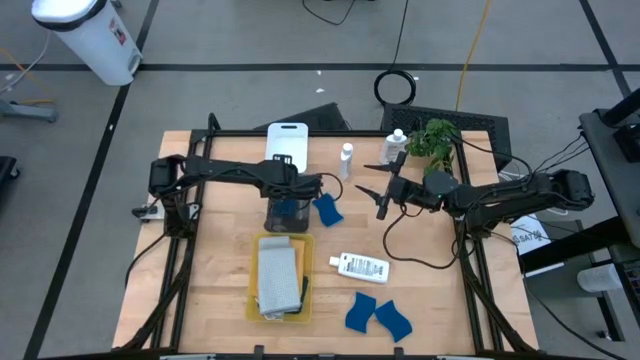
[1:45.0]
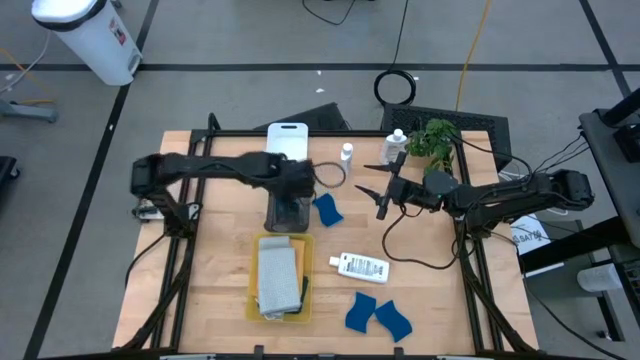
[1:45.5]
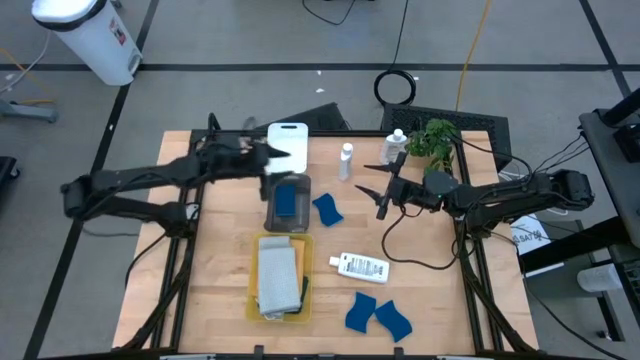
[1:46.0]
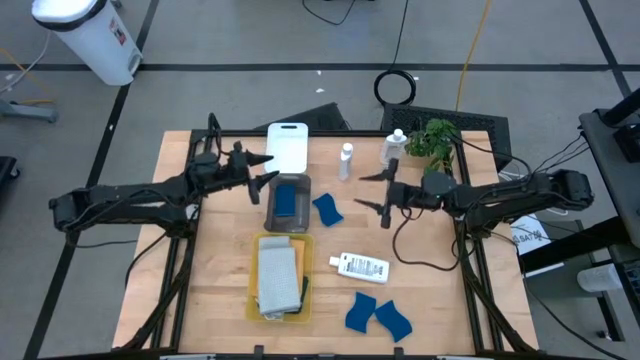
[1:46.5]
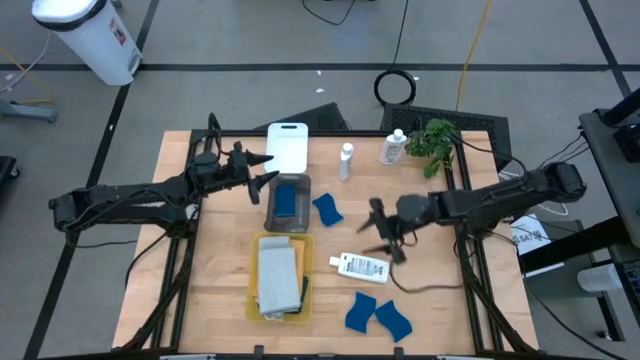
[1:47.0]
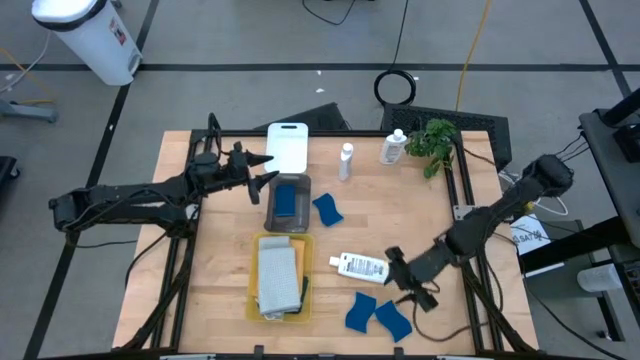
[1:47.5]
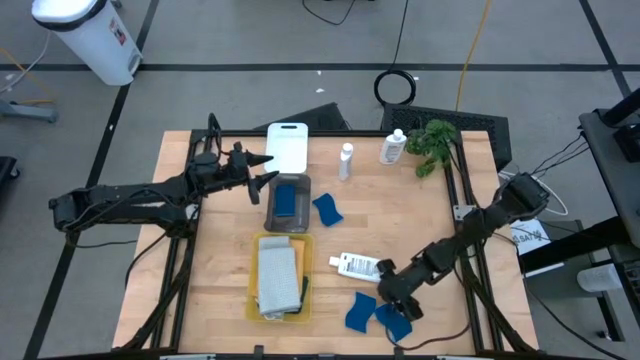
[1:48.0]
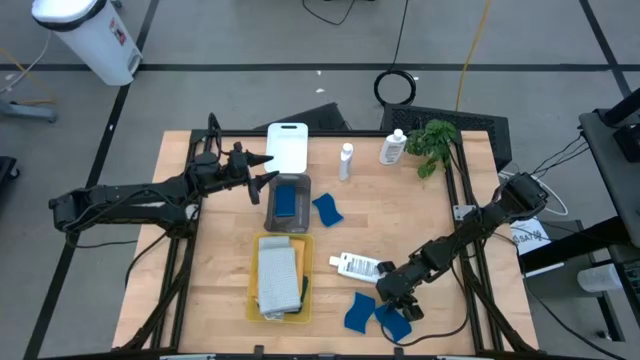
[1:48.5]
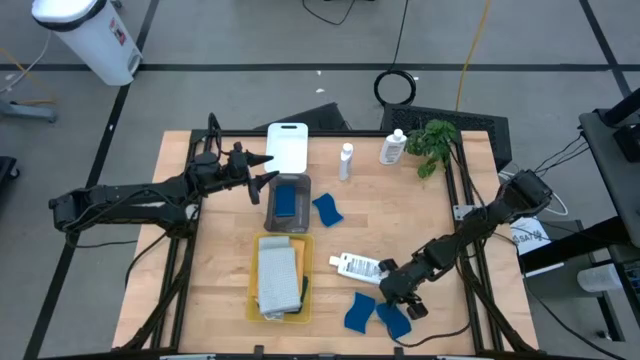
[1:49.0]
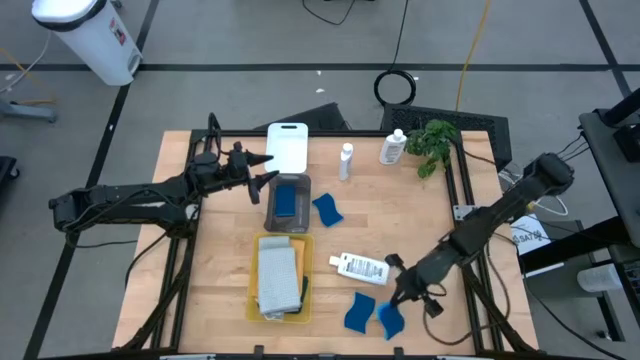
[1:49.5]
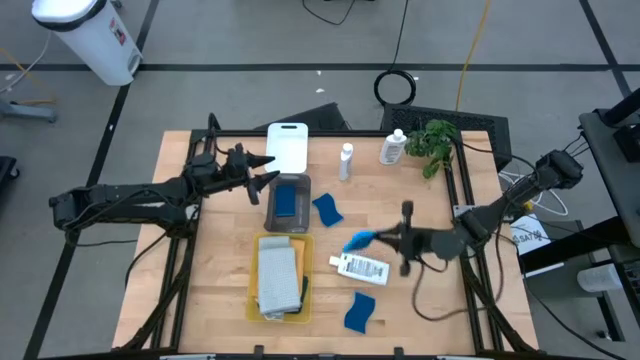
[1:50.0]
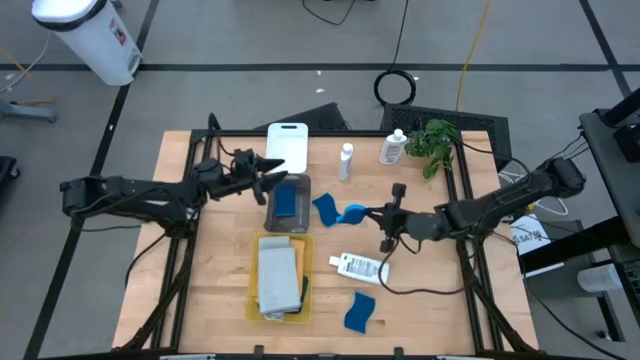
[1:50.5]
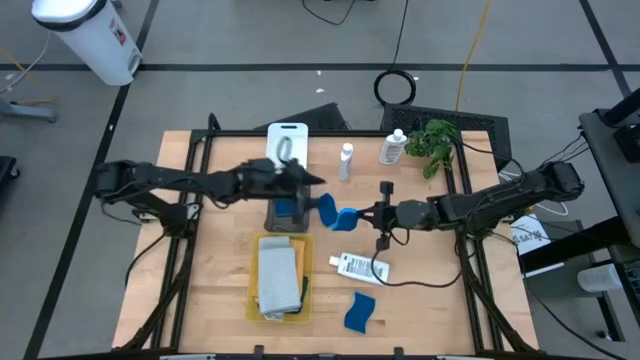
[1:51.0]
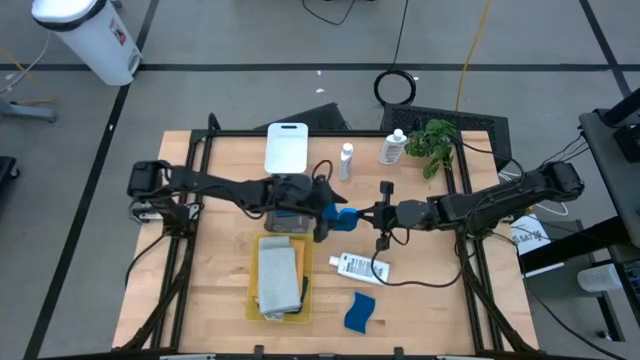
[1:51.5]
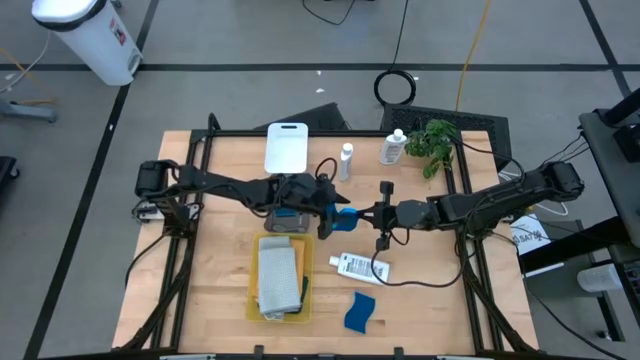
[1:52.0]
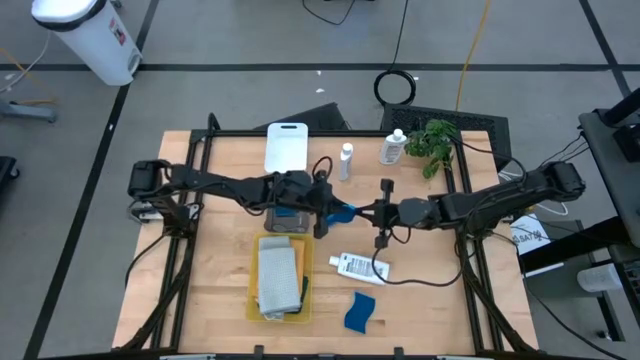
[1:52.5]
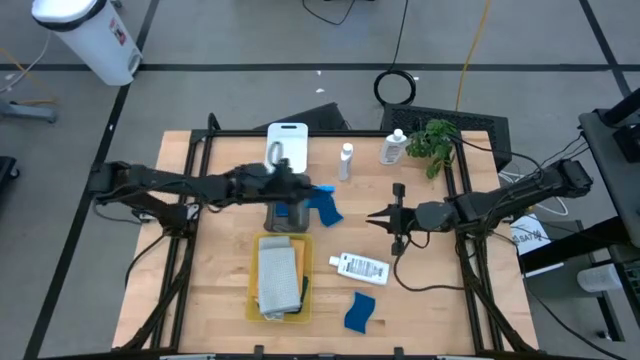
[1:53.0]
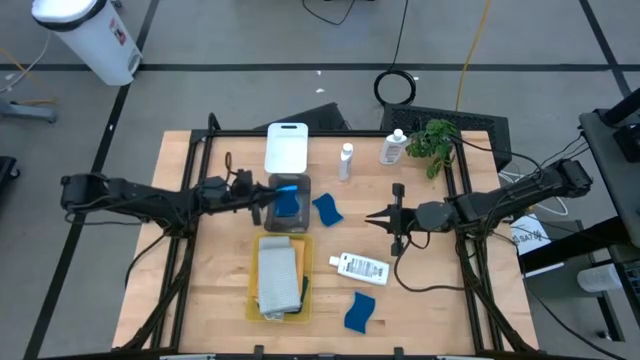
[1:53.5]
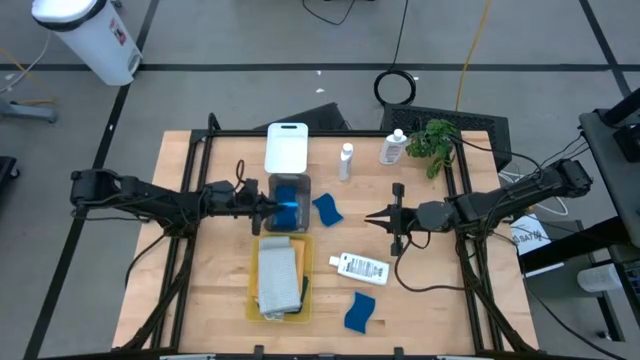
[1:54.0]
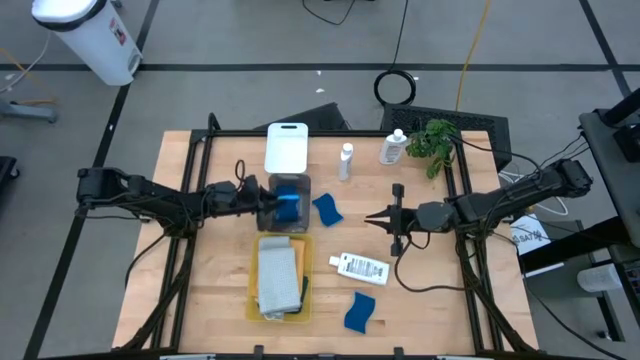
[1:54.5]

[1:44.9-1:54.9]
Task: Pick & Place Kitchen Items
Put the blue sponge into the black bin

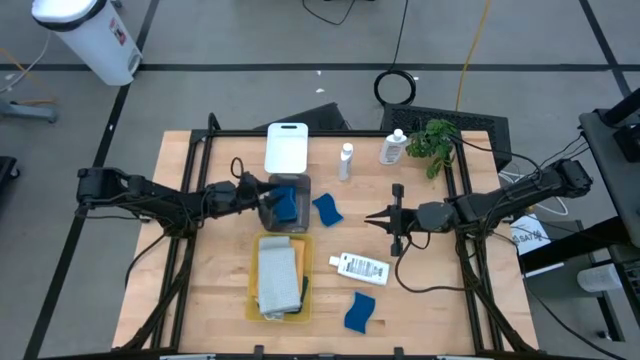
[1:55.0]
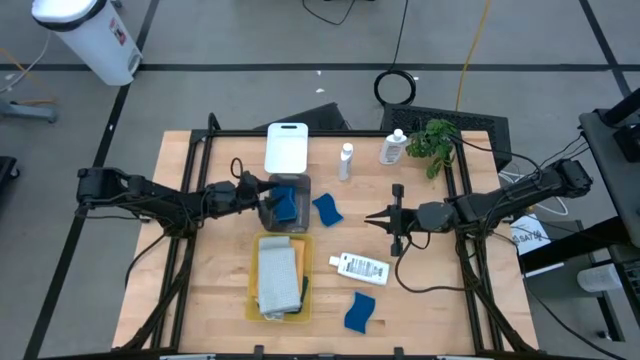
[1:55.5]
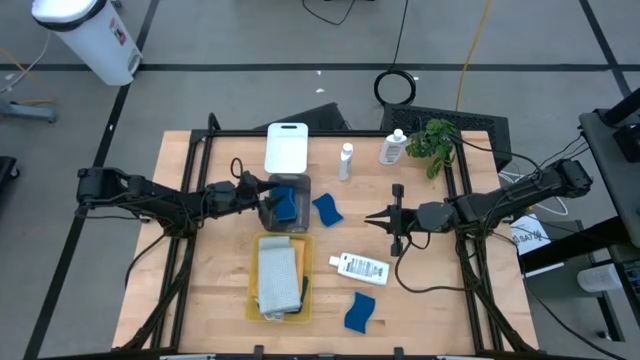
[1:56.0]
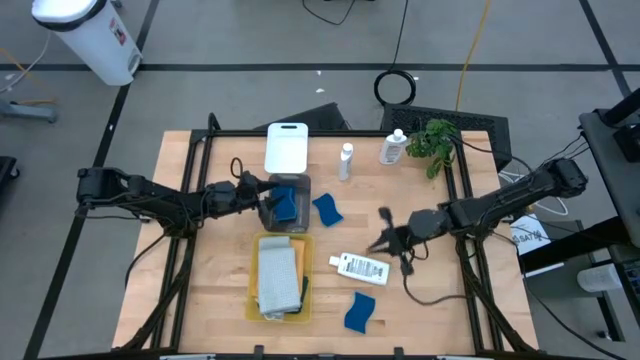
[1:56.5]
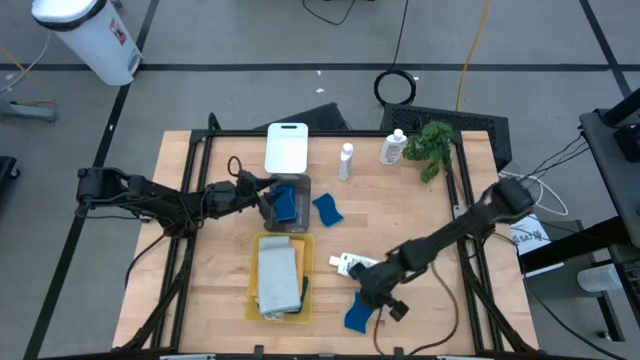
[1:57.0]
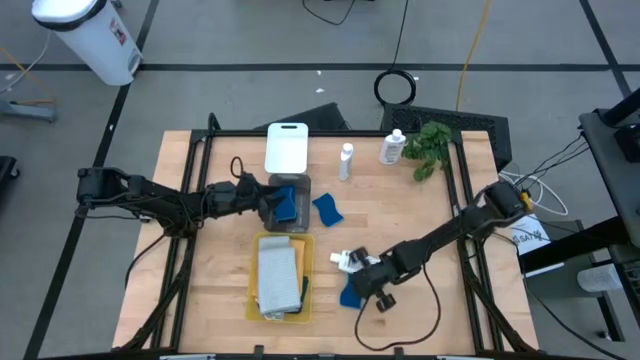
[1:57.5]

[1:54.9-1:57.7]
Adjust the blue sponge on the table

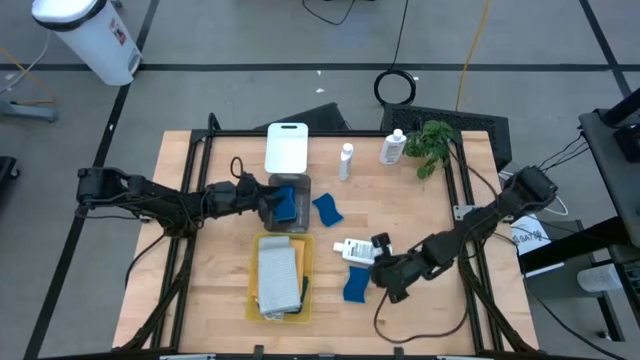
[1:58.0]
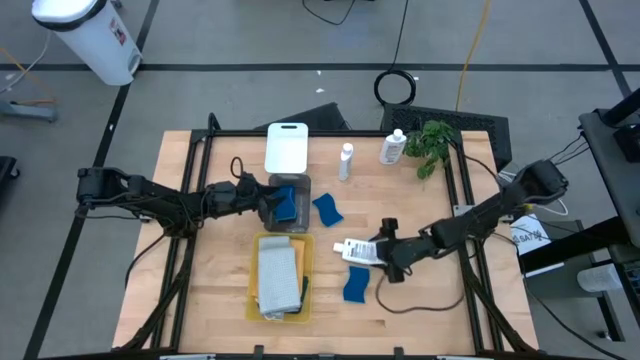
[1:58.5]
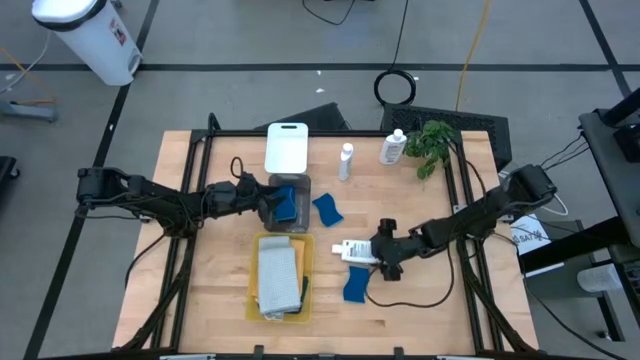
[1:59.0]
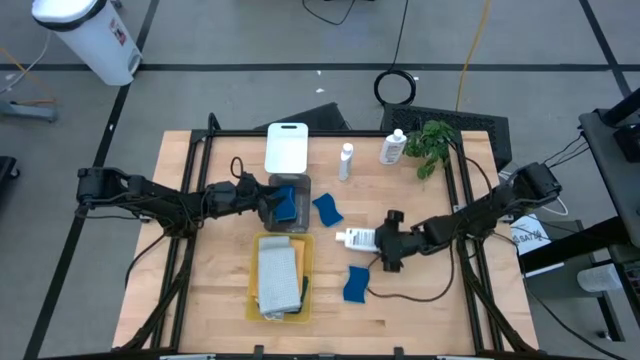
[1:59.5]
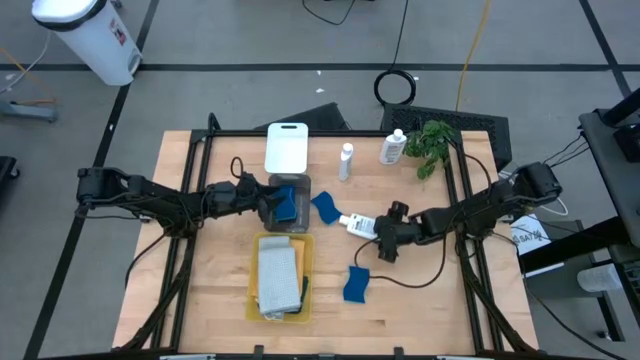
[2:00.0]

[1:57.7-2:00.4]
Adjust the white plastic restorer bottle on the table

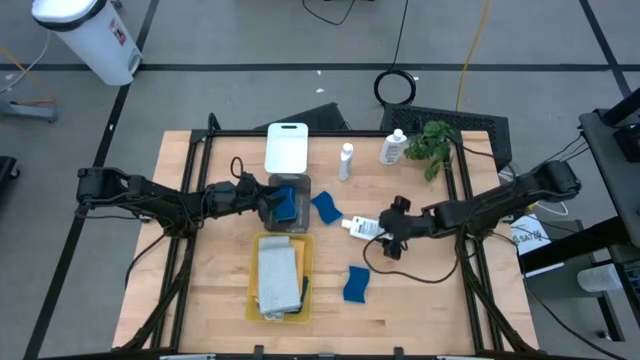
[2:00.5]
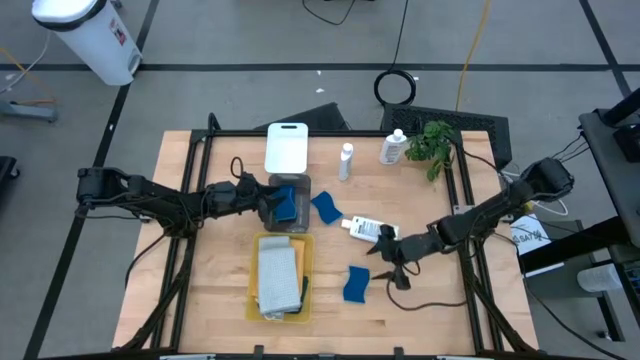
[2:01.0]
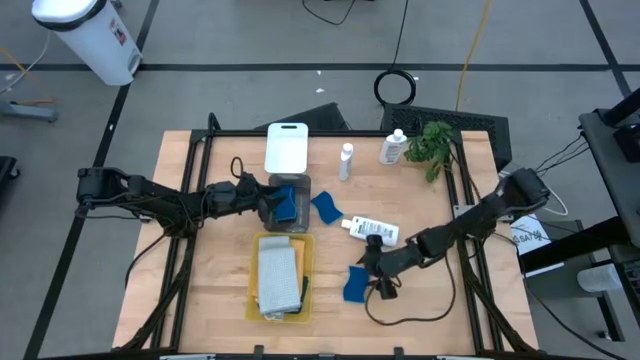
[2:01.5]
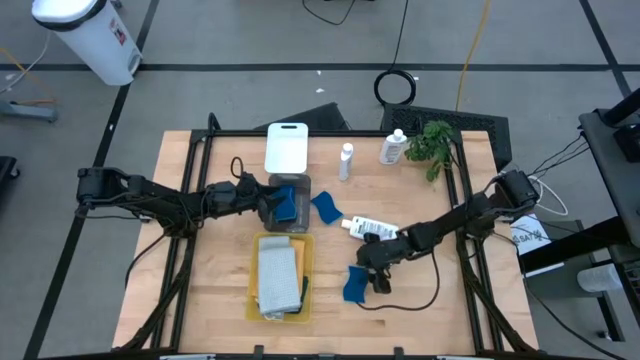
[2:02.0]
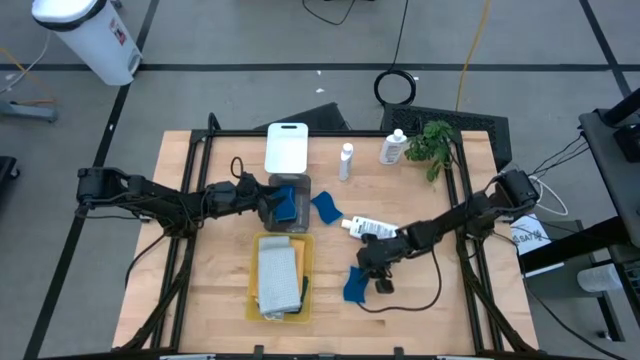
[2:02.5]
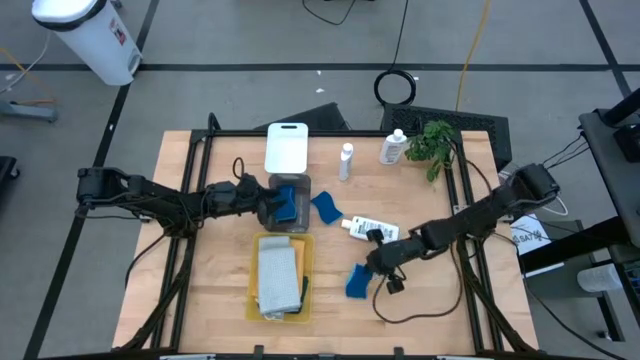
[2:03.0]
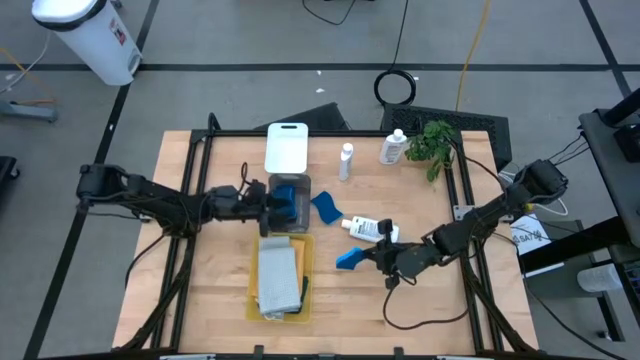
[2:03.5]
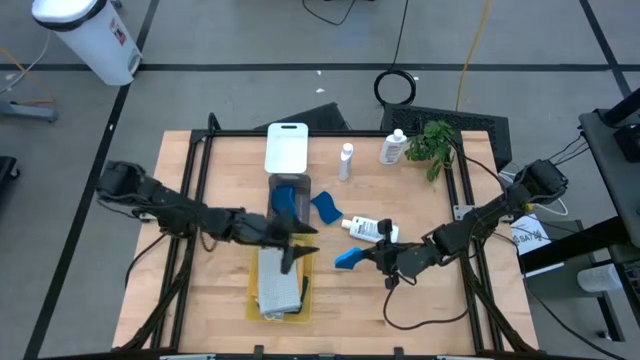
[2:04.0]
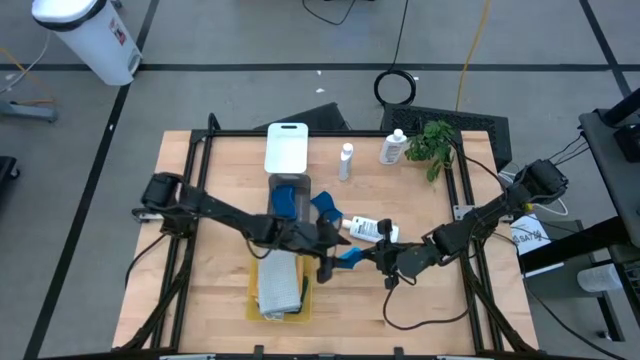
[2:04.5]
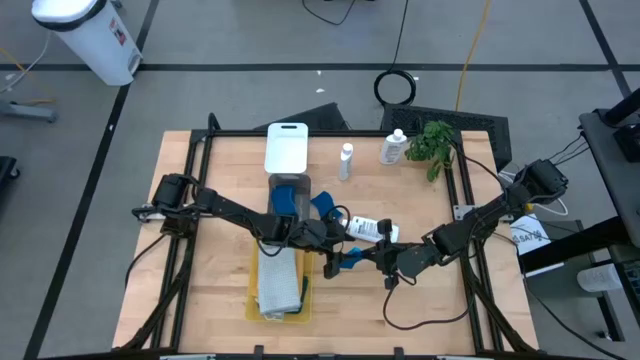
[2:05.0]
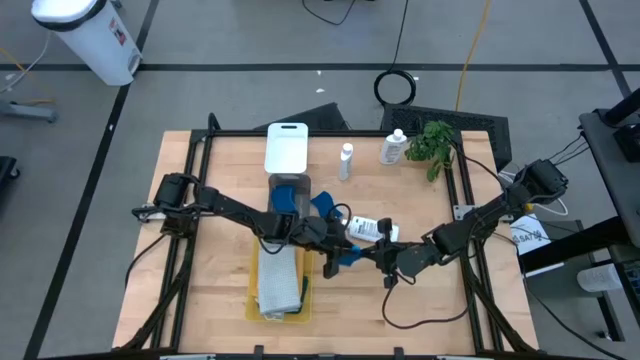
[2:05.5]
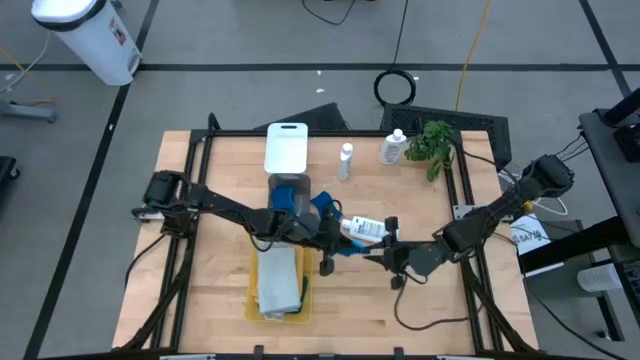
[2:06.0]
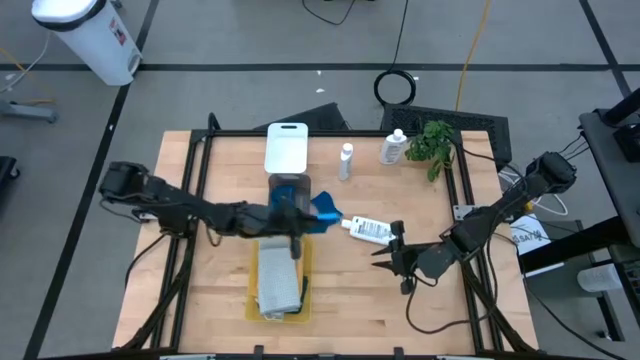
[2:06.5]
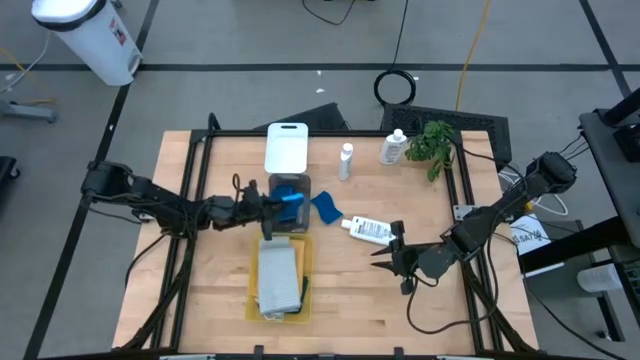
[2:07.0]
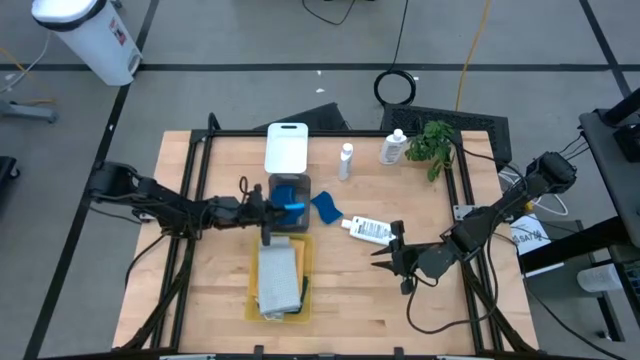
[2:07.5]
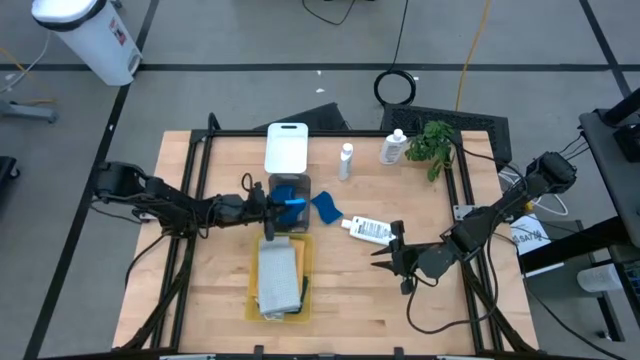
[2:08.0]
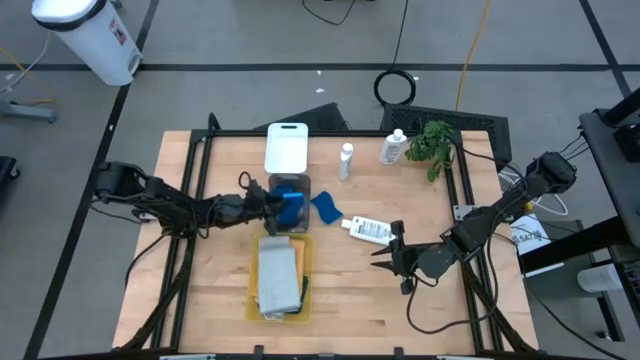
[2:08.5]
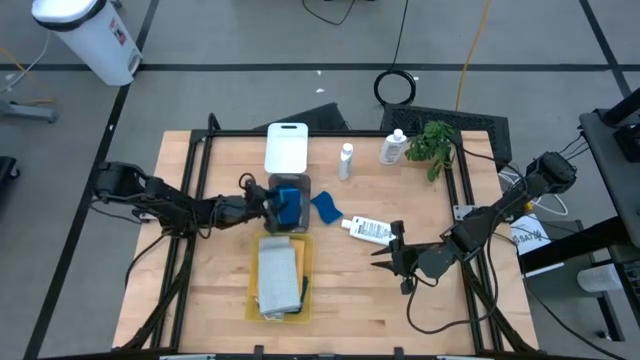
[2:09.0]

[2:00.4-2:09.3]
Put the blue sponge into the black bin
